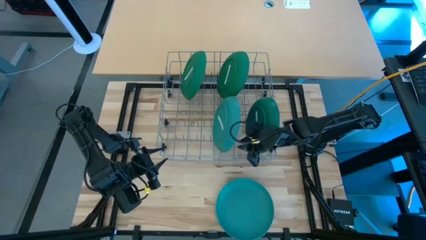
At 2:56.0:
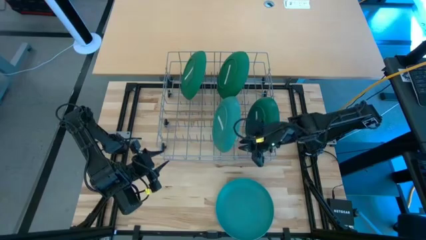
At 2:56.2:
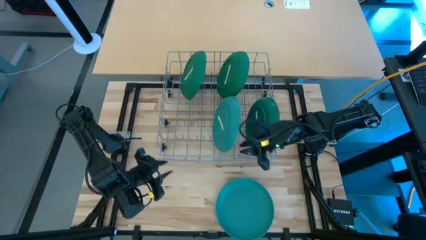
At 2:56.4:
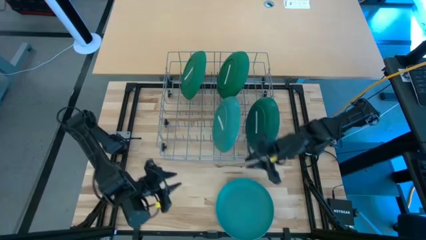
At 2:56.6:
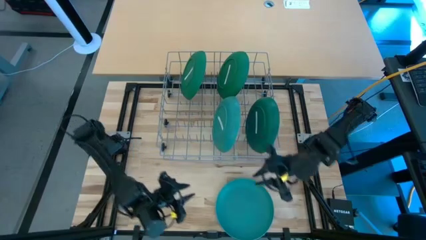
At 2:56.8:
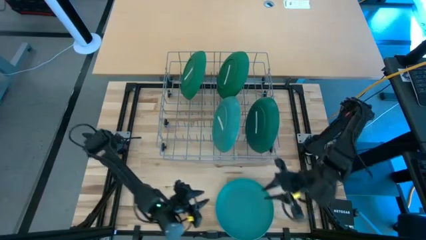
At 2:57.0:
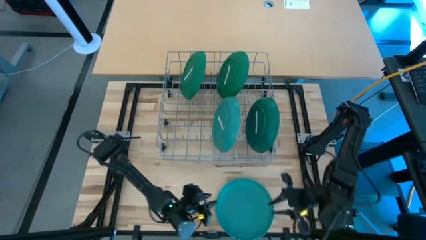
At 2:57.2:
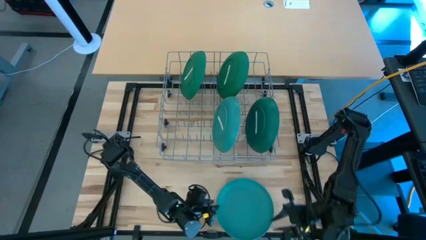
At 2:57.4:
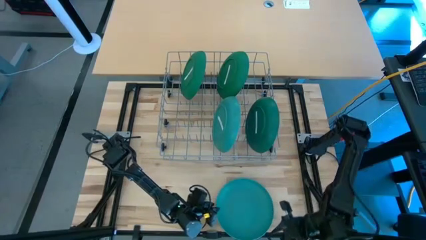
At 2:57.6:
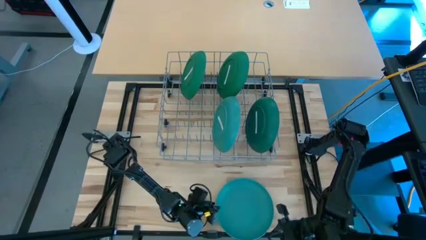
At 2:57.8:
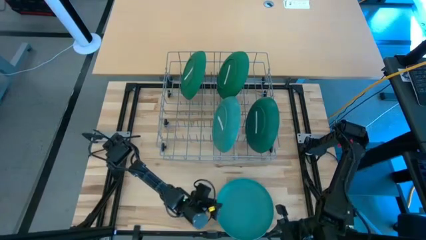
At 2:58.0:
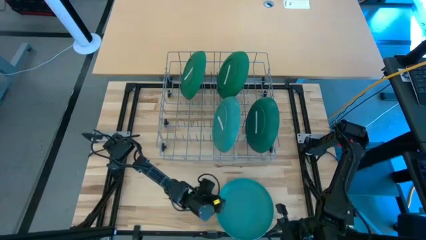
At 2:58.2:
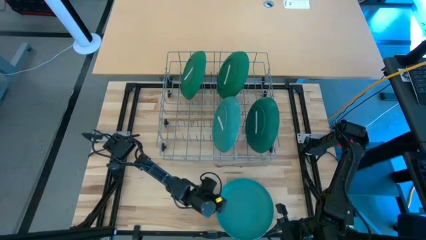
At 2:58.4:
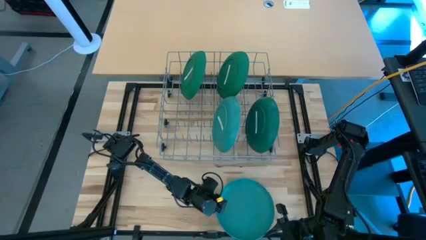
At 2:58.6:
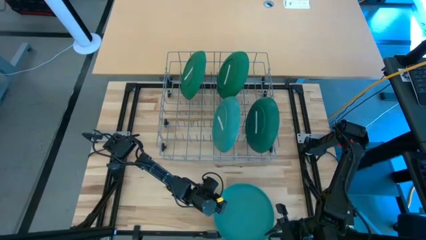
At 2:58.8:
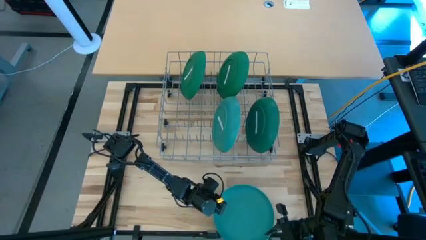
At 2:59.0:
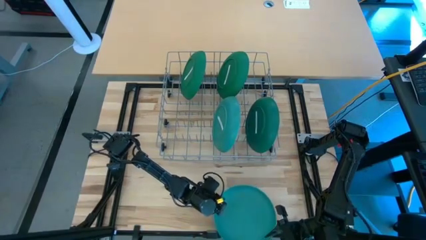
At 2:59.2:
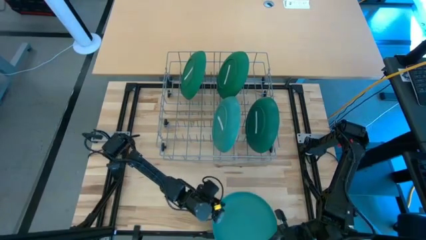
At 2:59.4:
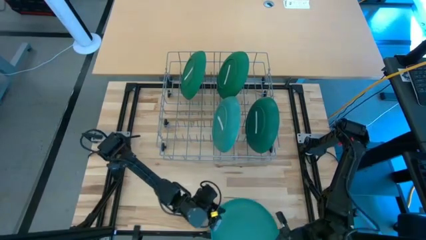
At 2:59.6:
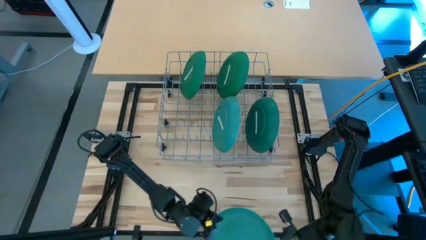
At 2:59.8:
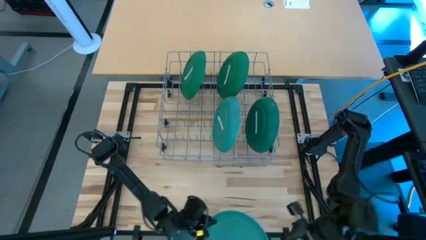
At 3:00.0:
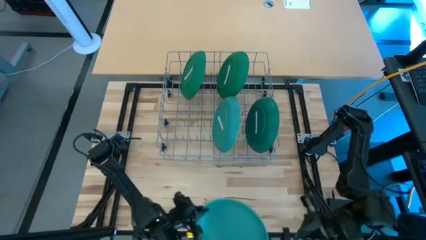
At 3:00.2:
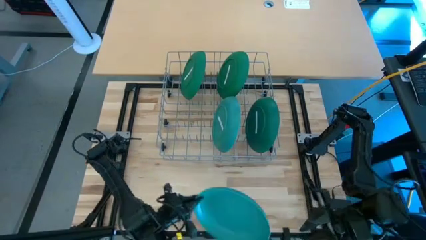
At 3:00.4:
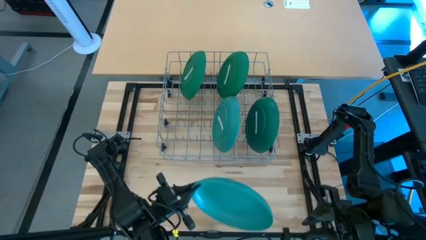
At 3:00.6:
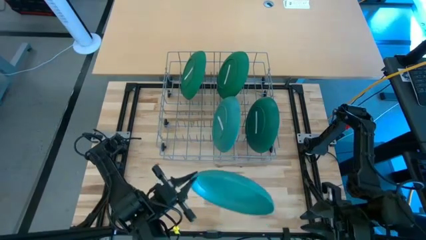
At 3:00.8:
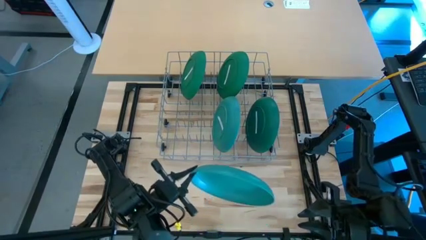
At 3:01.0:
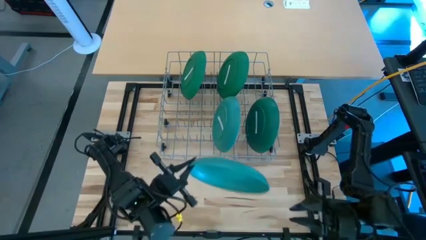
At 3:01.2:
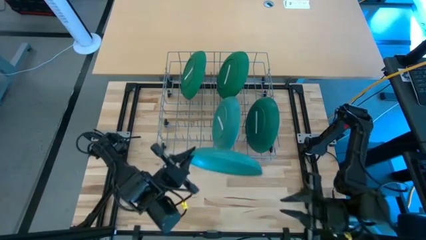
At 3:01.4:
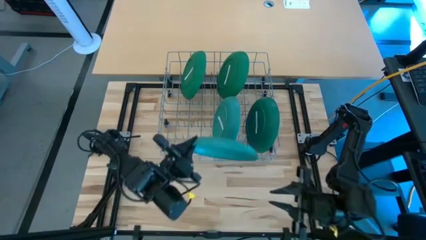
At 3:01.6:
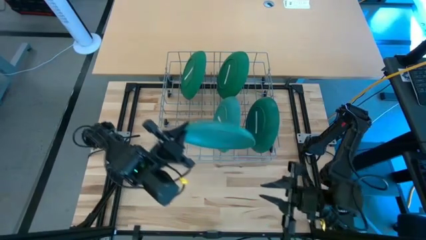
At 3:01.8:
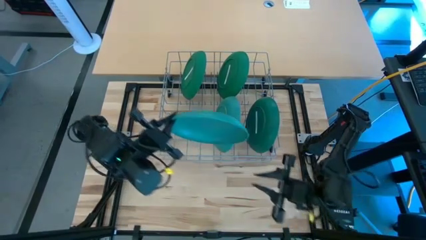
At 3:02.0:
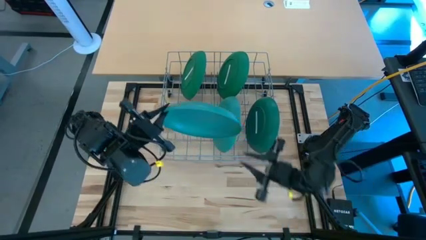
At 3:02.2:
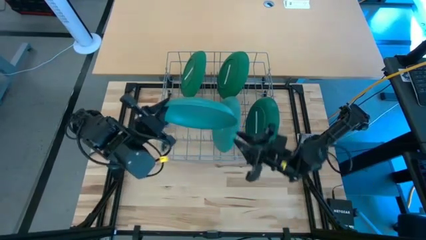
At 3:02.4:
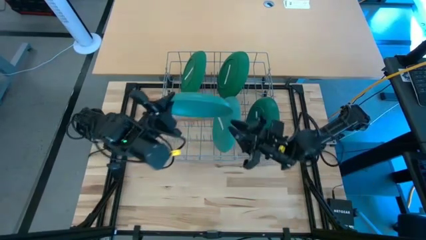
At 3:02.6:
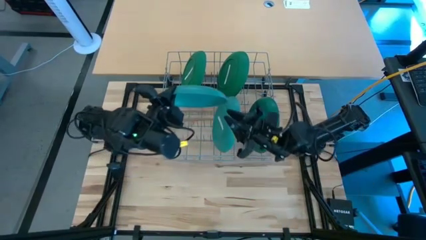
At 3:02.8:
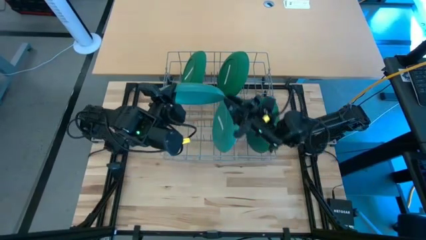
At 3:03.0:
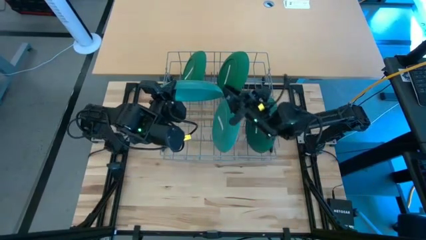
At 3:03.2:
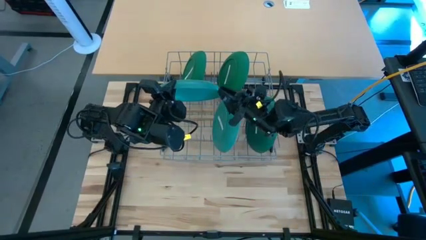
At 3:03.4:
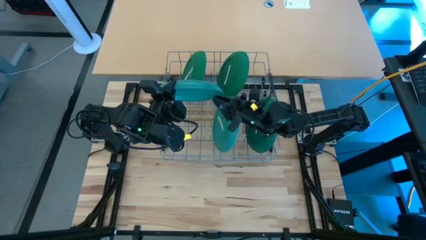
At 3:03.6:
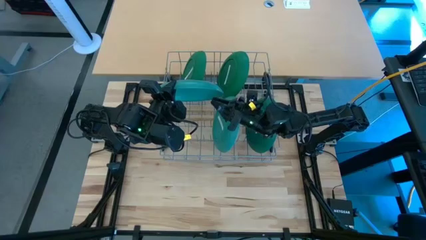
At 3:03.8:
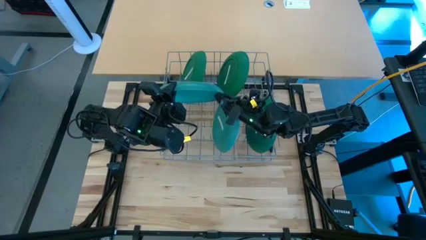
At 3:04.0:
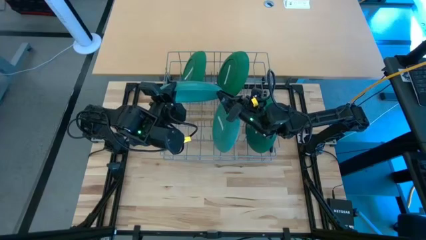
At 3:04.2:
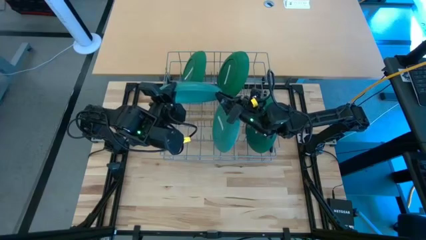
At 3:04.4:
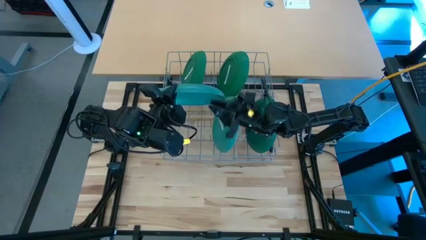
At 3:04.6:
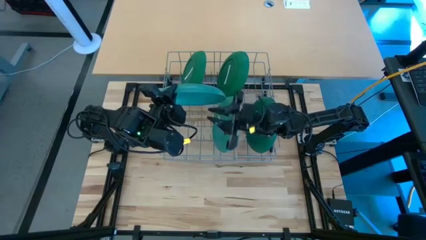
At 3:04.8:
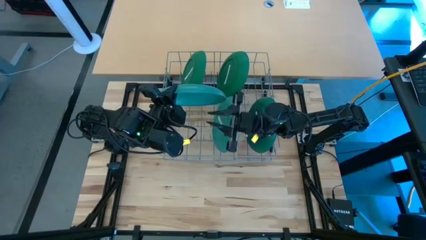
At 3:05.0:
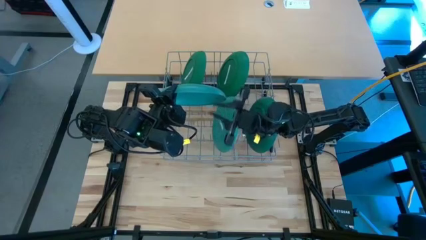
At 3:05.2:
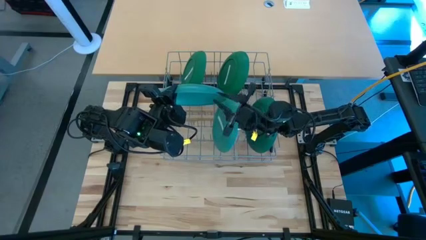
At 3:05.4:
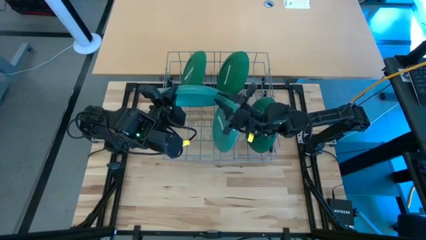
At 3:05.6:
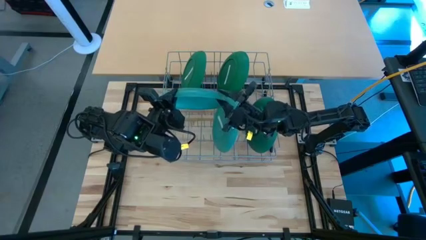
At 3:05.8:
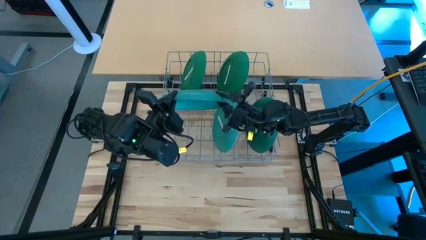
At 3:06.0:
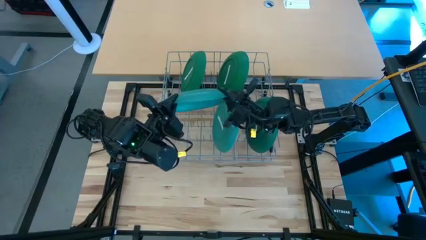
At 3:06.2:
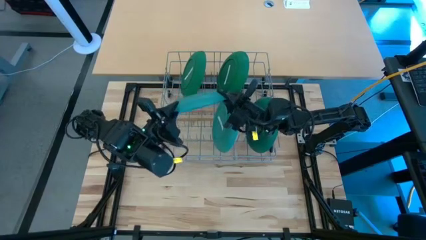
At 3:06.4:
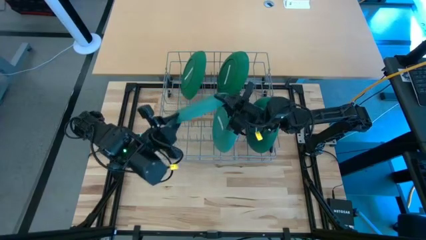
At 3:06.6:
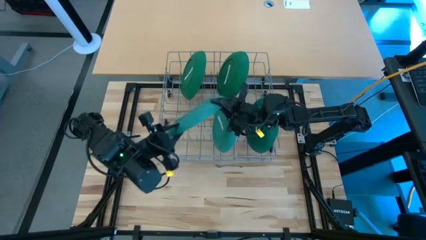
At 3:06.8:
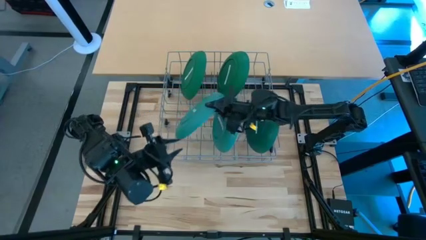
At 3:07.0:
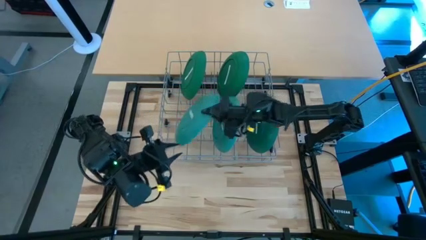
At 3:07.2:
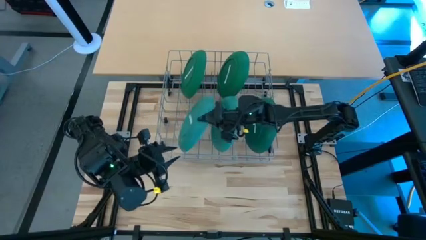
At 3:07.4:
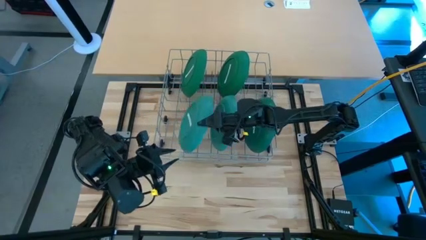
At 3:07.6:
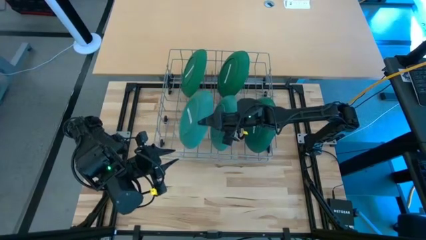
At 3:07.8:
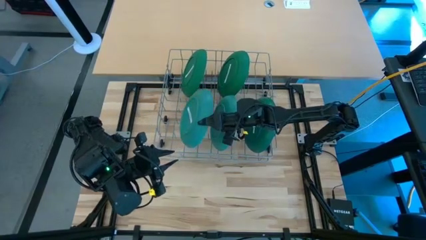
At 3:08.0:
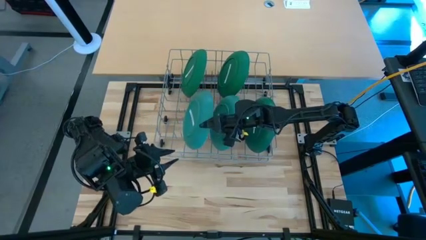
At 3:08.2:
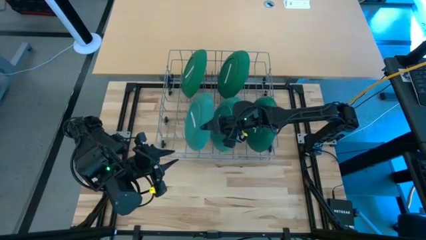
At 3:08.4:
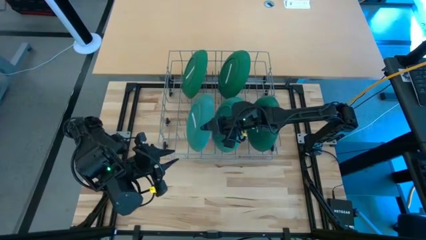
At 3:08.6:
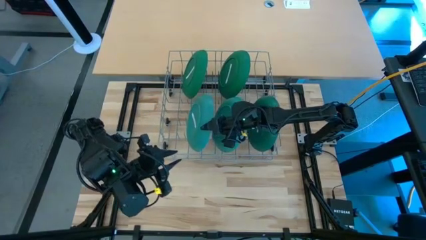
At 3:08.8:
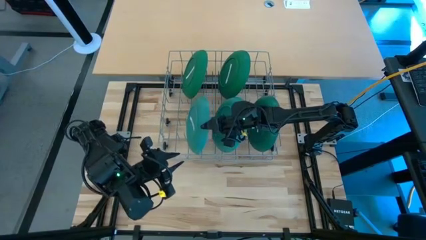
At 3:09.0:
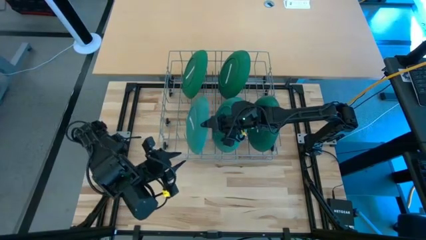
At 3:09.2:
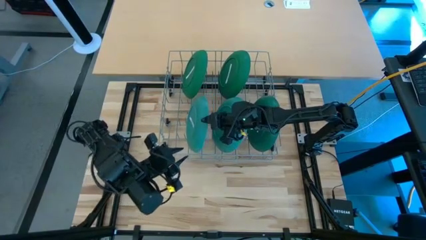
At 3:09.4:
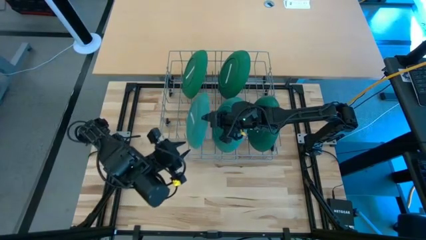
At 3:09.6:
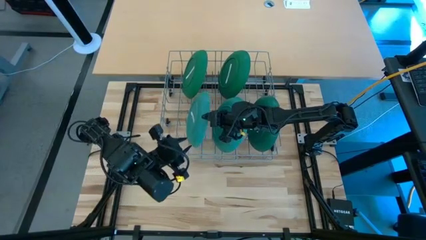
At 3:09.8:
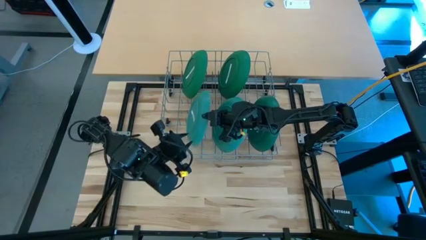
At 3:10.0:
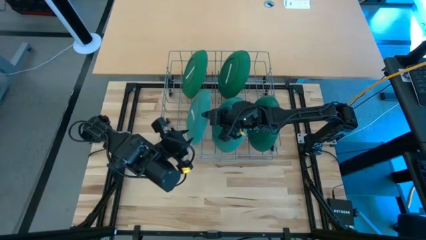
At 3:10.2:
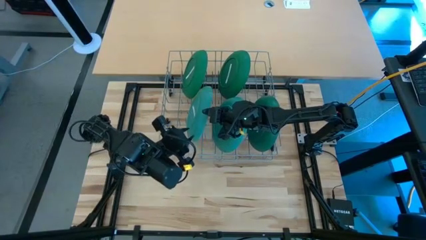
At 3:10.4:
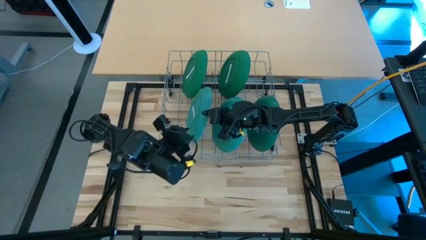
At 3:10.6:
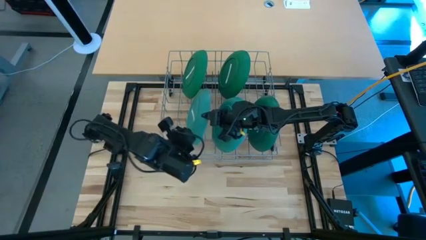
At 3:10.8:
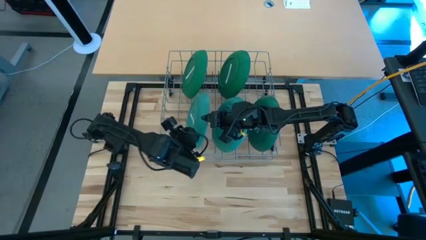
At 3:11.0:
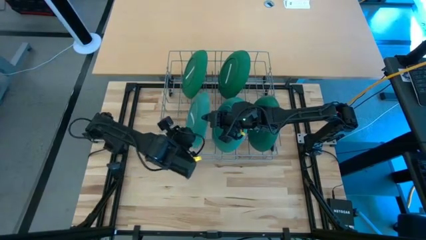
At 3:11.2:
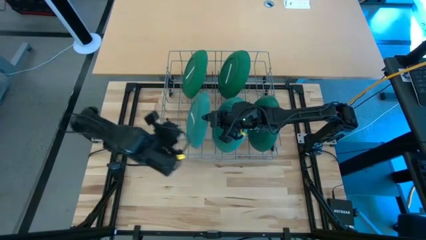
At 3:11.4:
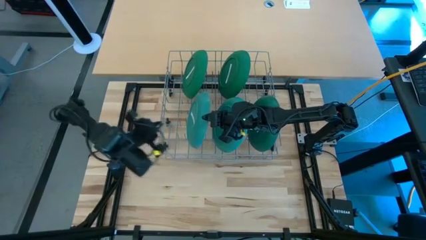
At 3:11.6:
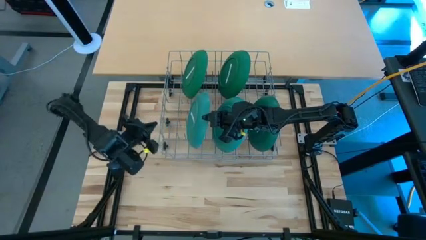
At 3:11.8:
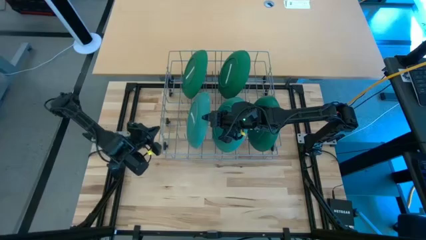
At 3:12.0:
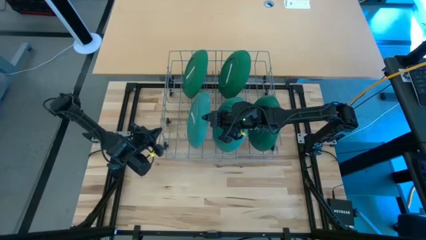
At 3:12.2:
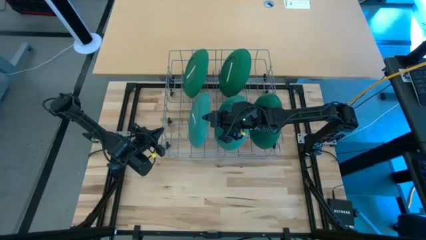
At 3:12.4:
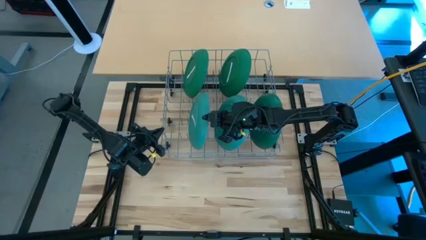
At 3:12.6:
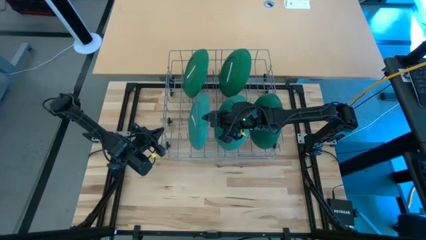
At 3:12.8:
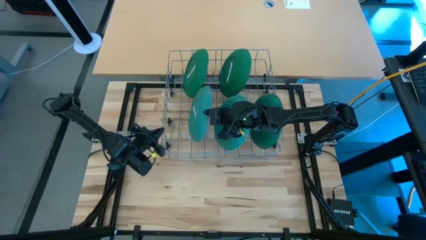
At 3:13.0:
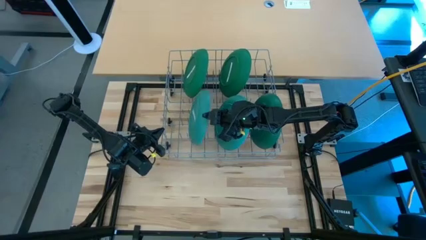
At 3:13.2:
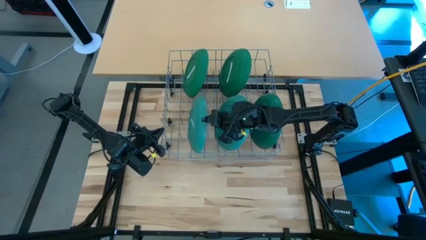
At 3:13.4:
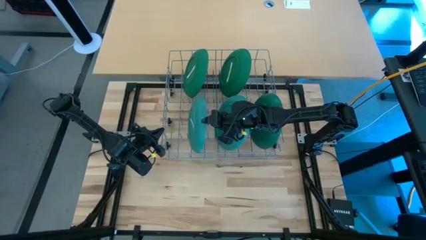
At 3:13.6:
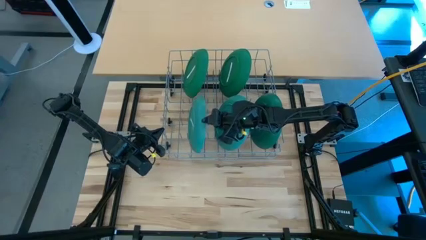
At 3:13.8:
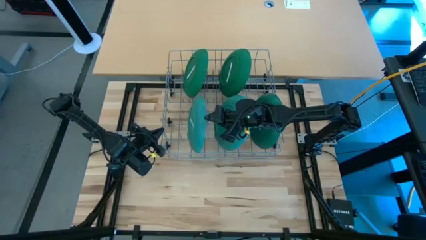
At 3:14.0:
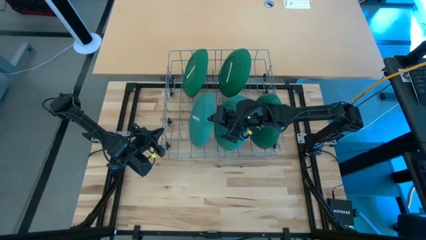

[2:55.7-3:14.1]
Task: Sort dishes
Put the light green plate in the dish rack
